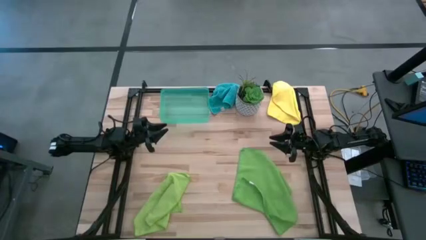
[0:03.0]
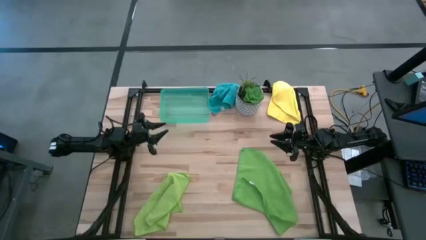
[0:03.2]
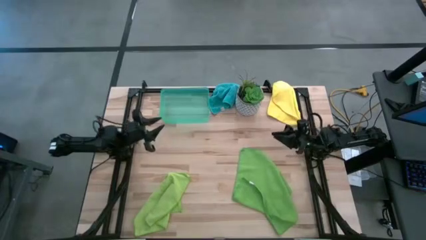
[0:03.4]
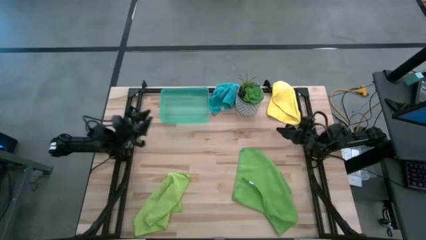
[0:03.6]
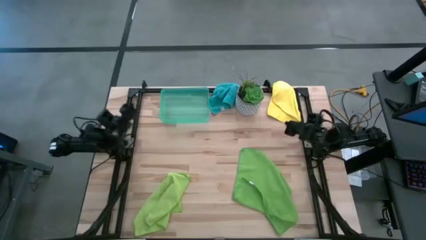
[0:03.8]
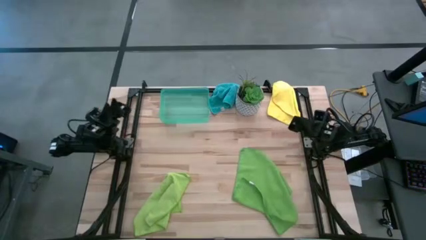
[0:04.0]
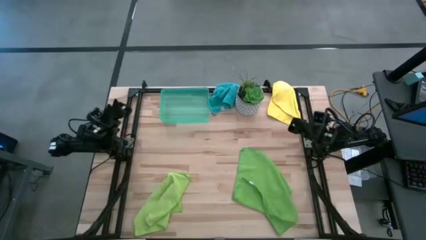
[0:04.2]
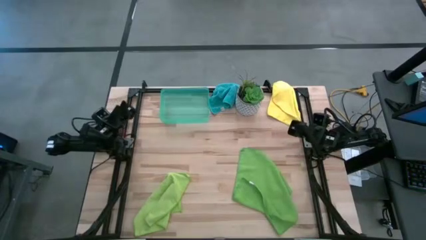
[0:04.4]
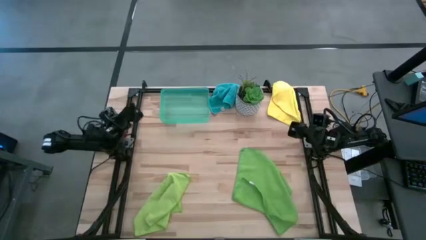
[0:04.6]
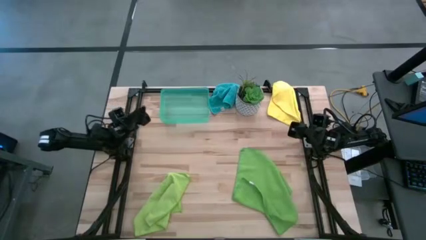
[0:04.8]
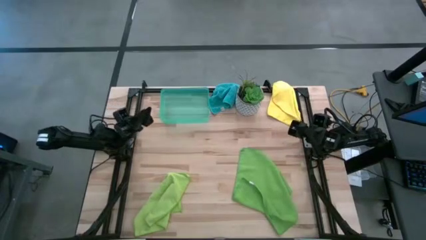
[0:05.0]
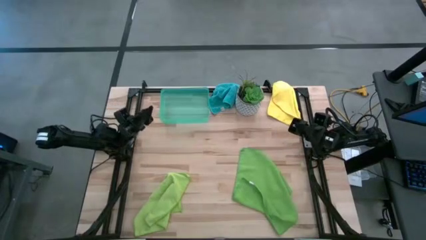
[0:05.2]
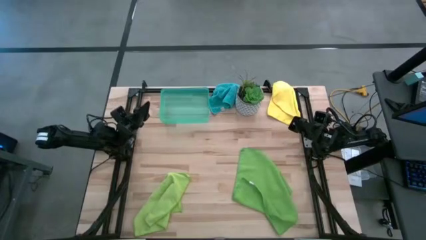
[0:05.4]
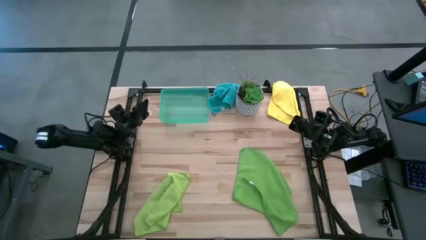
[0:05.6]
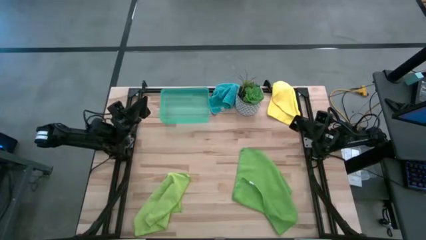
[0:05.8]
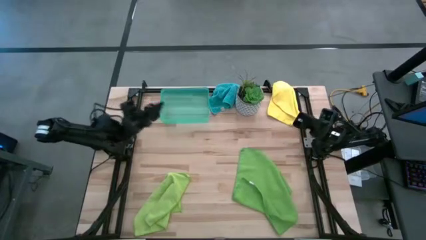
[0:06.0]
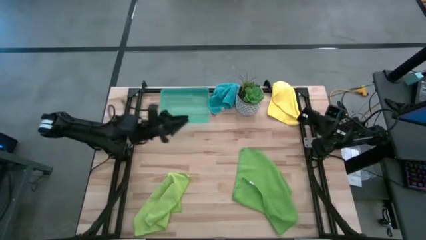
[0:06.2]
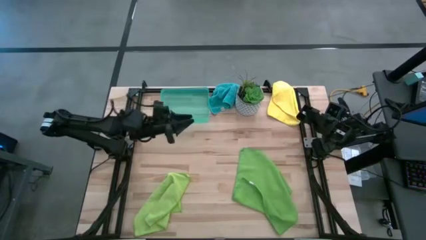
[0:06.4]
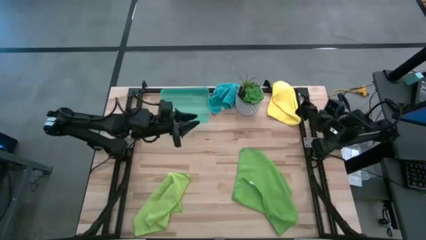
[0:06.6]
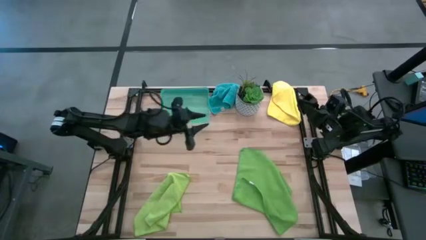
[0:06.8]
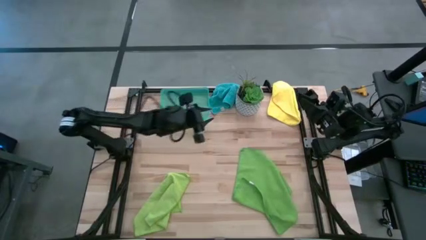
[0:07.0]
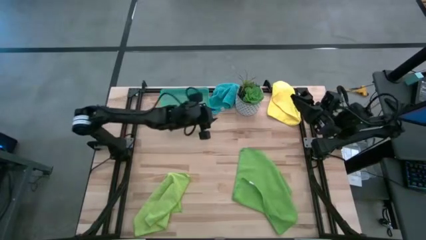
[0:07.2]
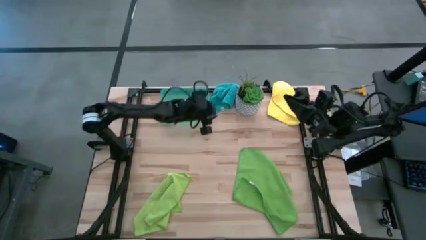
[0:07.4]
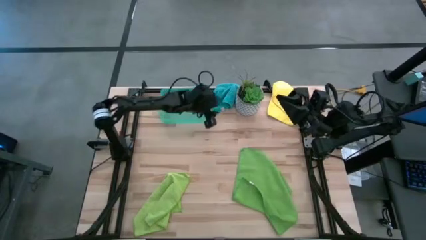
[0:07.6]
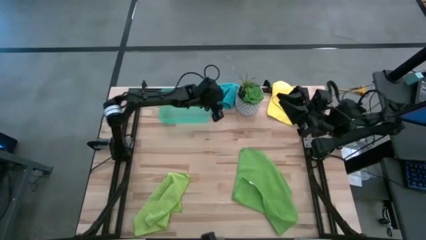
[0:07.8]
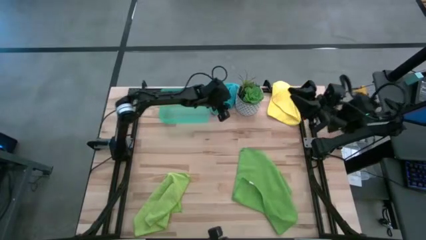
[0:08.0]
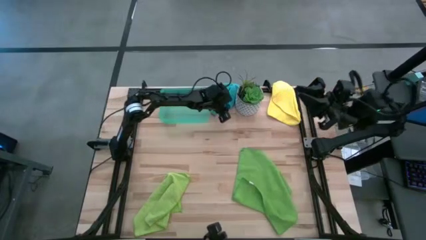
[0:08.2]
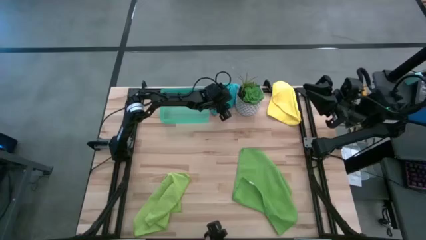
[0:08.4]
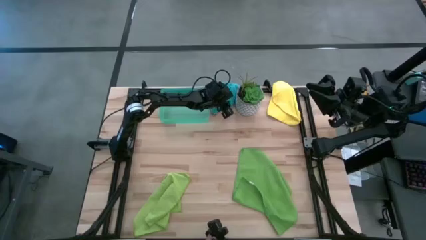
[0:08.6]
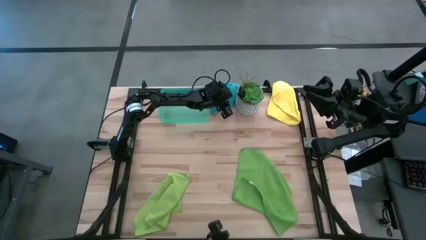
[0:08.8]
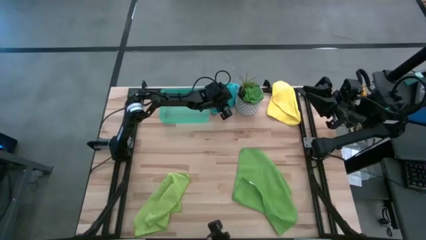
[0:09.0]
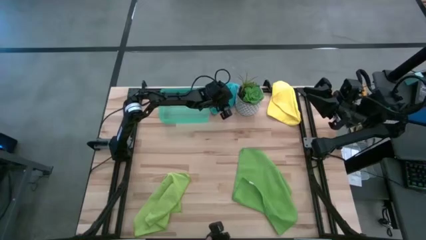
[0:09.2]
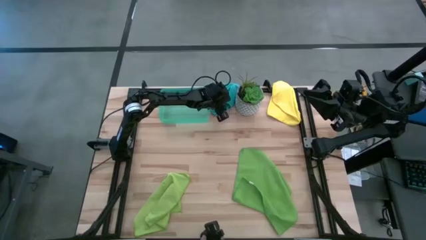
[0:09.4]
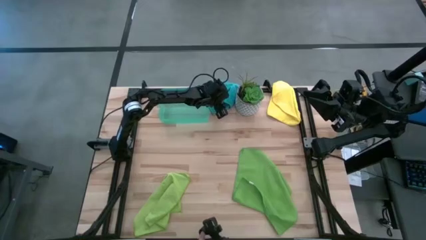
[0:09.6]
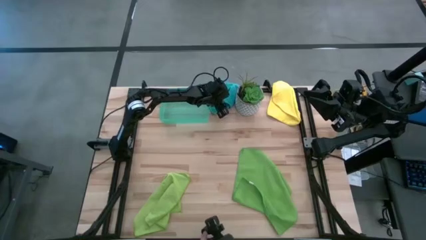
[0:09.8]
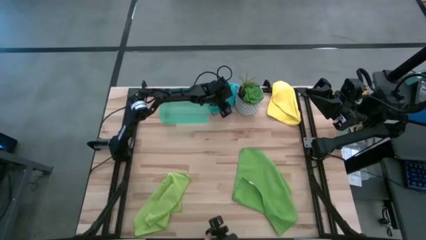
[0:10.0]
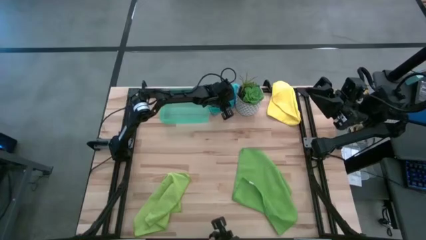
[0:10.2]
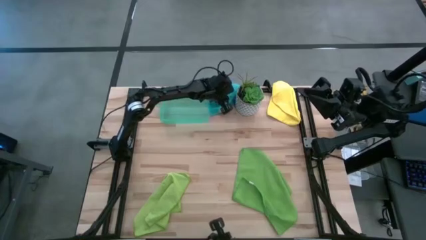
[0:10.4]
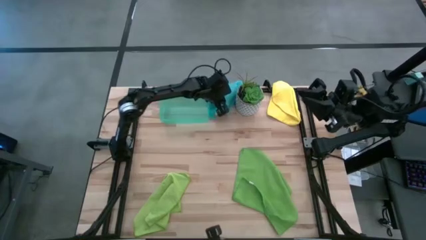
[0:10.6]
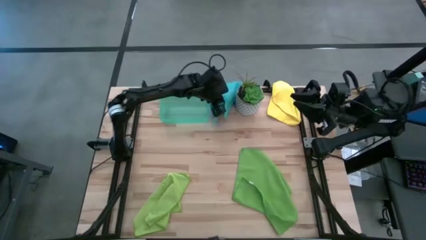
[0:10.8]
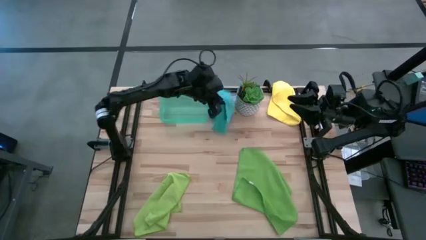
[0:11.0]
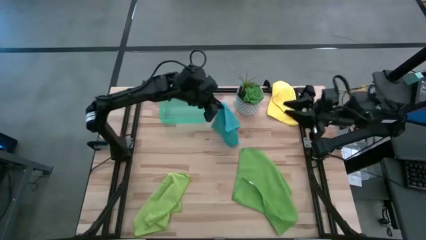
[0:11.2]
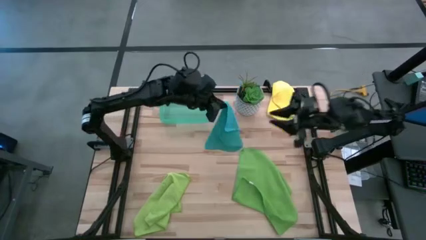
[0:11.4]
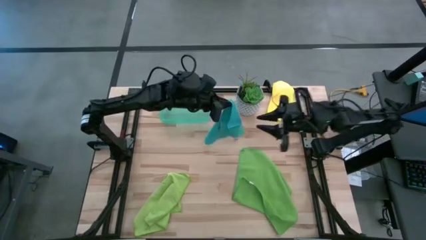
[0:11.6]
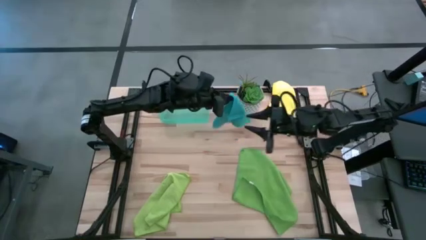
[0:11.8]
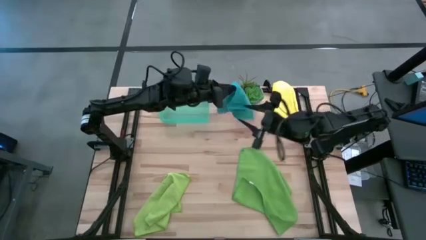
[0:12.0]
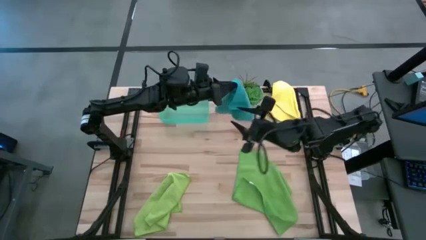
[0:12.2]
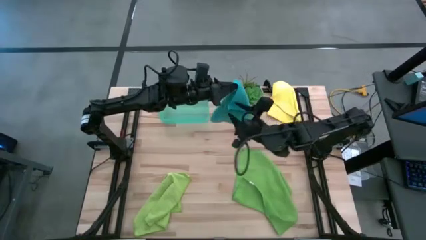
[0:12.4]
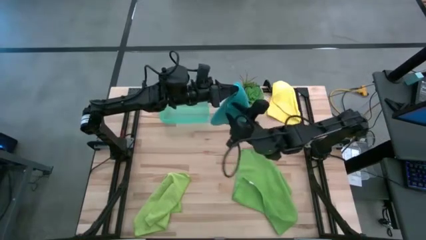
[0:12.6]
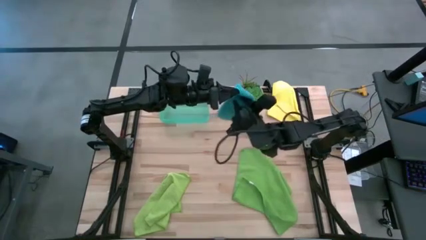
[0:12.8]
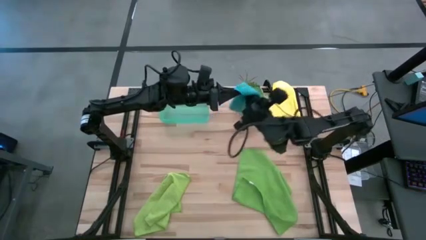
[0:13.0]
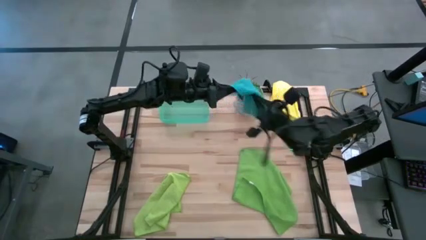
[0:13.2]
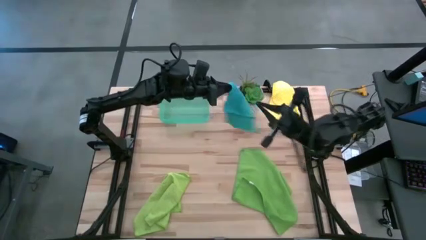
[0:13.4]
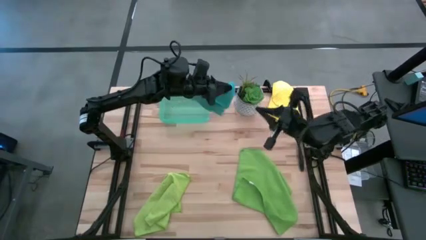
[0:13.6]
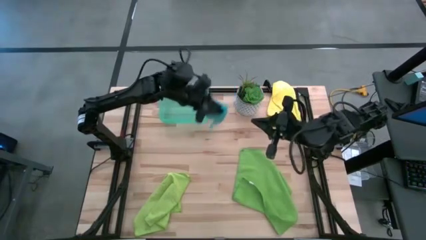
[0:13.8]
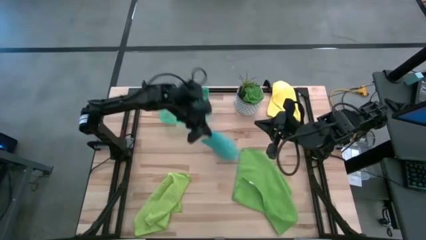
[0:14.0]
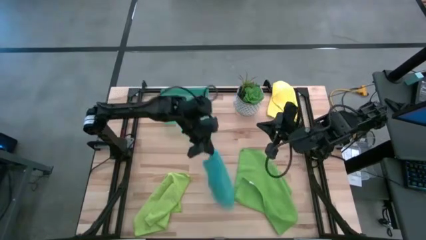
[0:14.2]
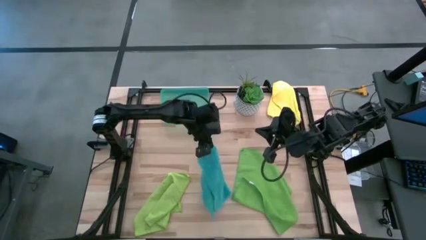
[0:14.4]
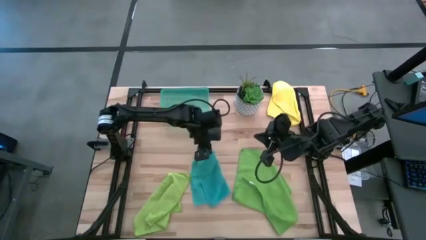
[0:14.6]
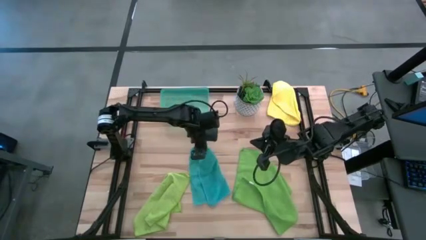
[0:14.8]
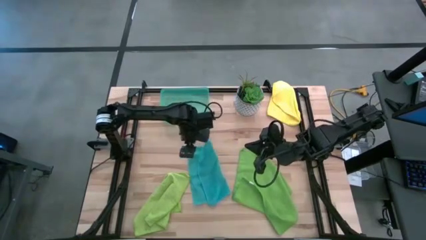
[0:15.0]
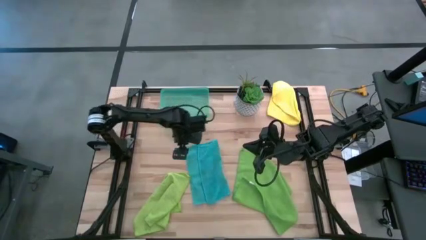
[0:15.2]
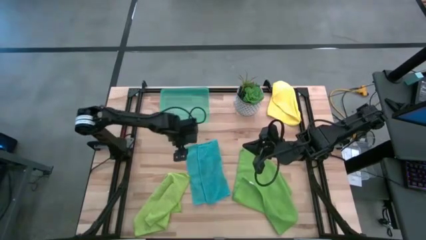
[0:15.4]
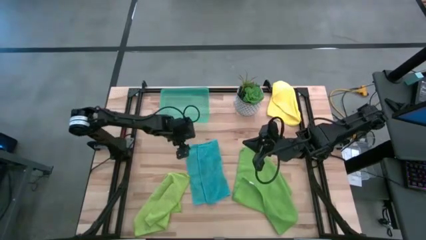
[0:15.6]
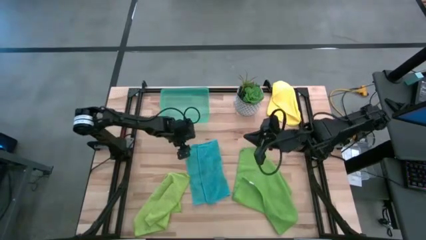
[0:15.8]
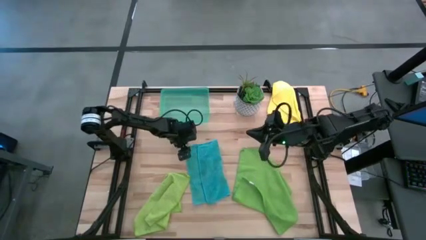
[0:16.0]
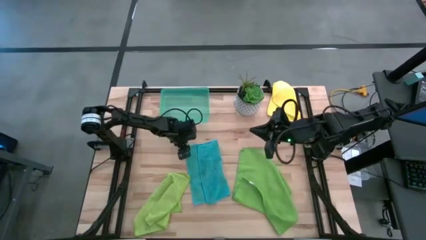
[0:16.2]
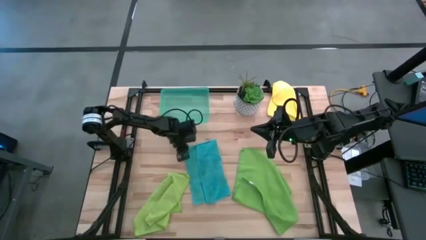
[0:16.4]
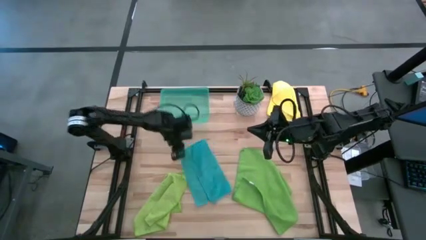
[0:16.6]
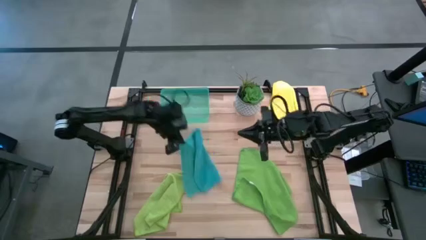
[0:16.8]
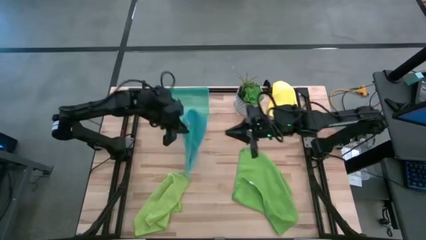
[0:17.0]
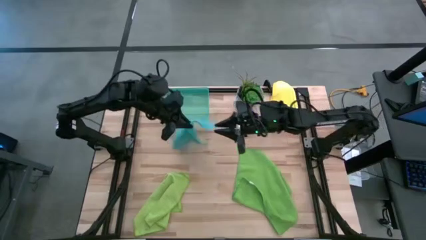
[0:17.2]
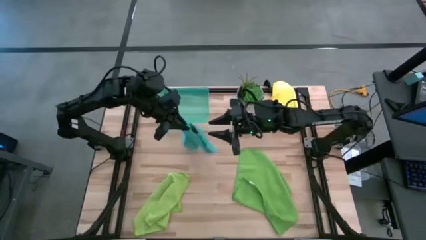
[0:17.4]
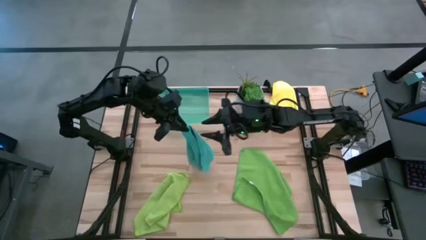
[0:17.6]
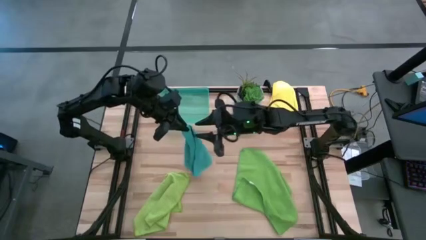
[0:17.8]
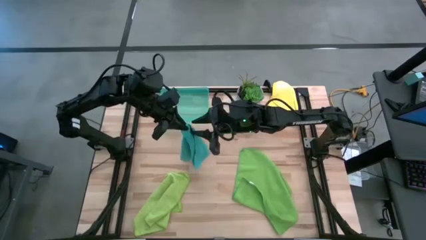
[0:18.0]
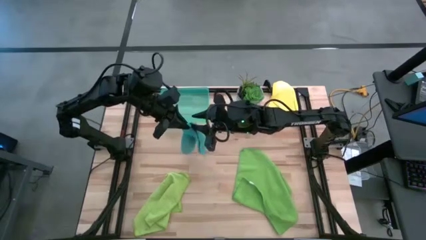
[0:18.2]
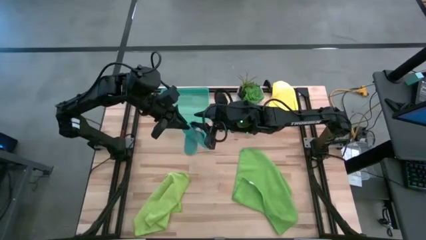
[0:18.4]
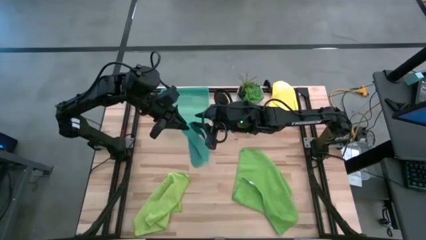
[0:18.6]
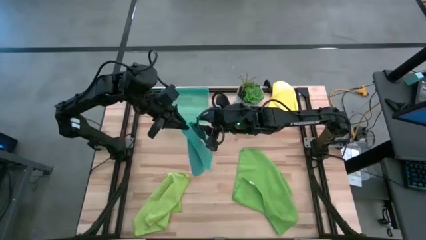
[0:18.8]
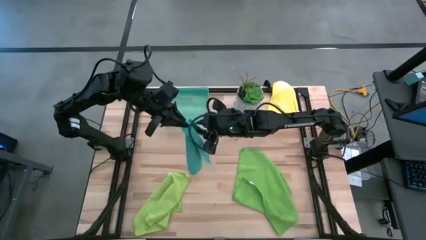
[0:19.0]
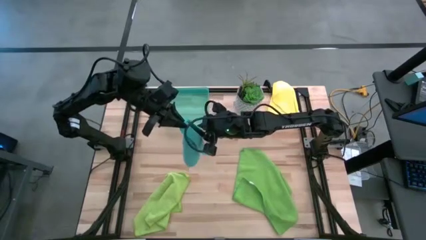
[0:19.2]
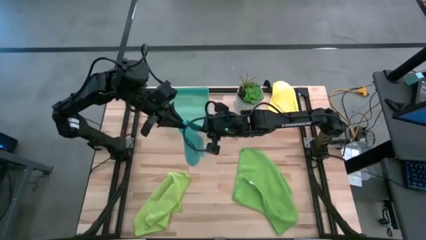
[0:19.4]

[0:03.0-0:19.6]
Task: Fold microfiber towels
Fold the blue microfiber cloth
